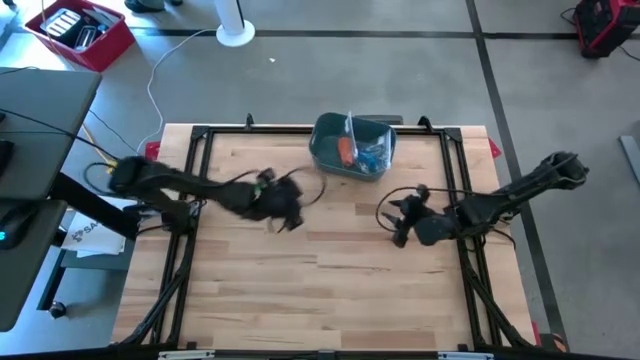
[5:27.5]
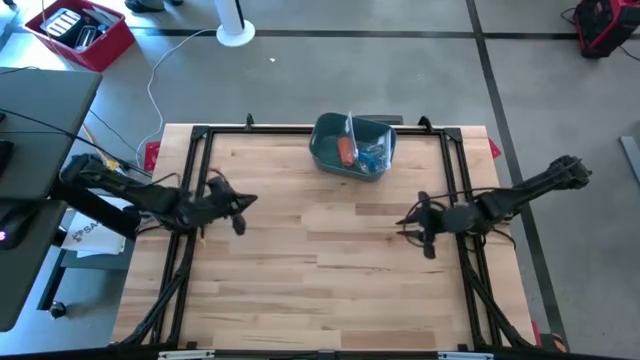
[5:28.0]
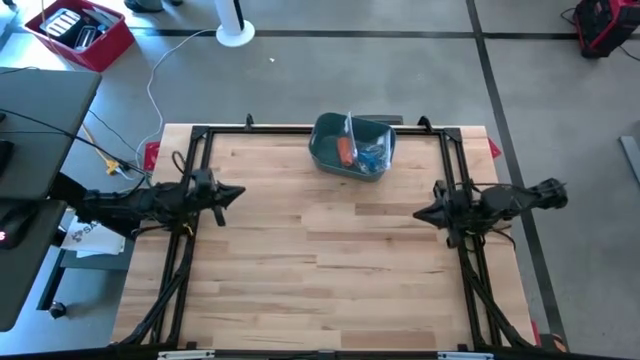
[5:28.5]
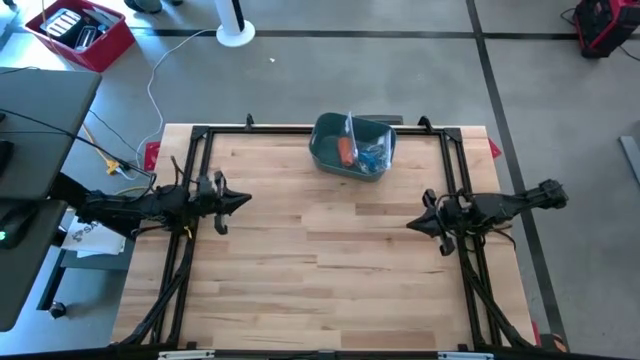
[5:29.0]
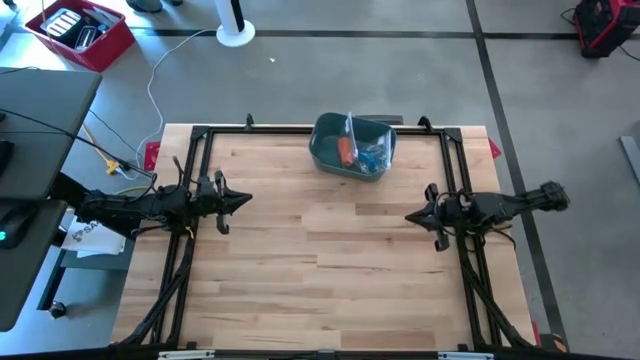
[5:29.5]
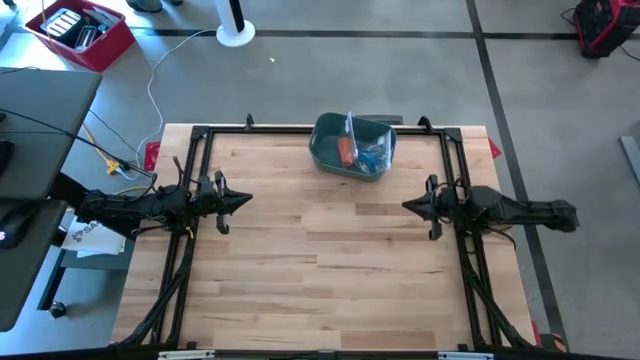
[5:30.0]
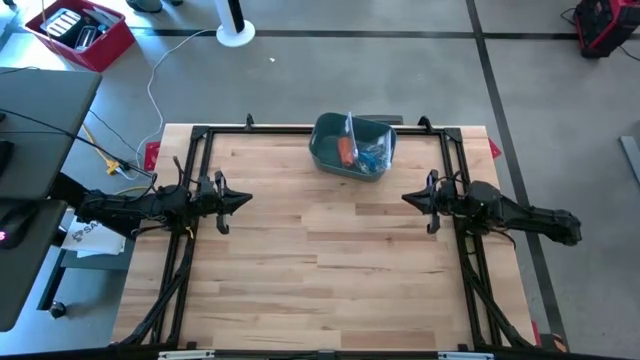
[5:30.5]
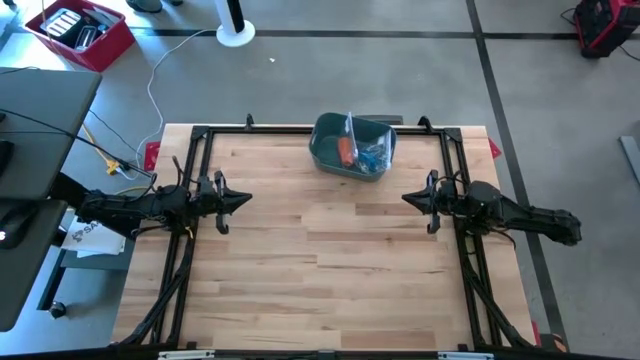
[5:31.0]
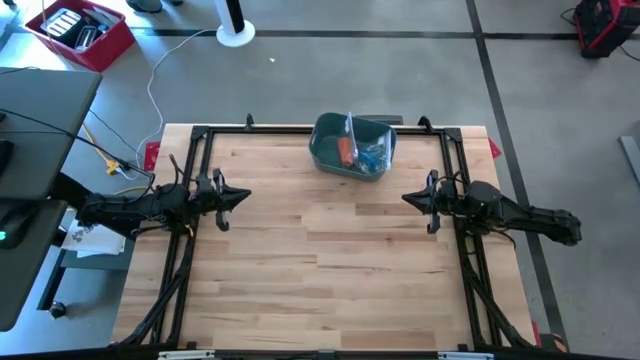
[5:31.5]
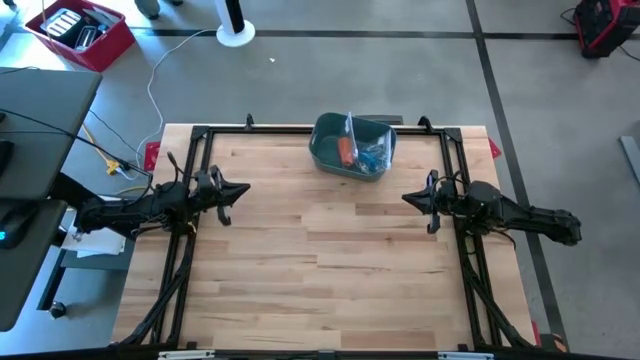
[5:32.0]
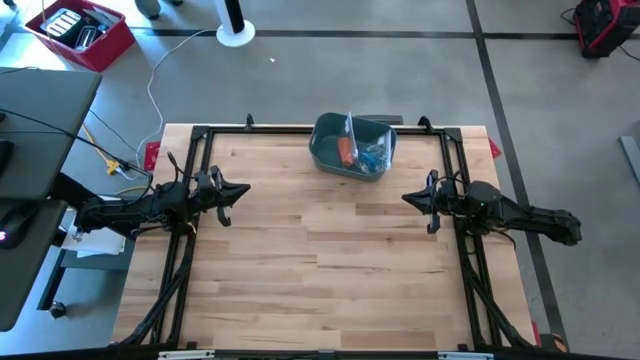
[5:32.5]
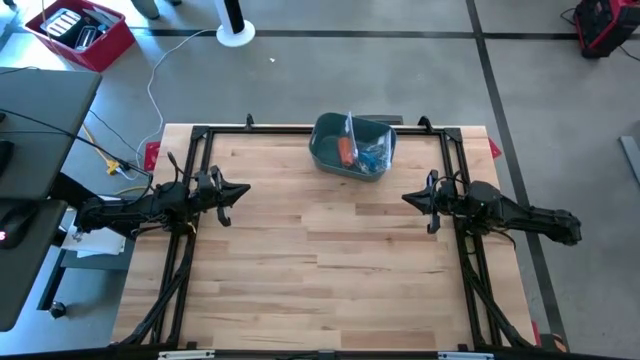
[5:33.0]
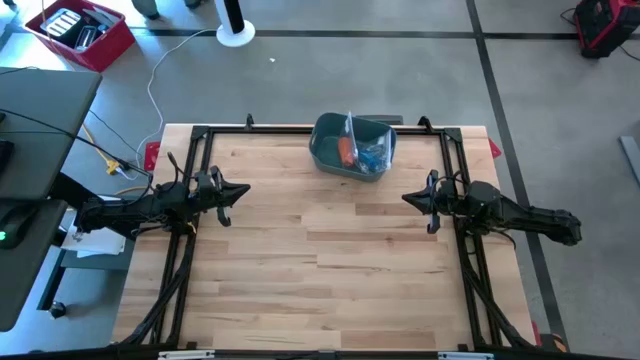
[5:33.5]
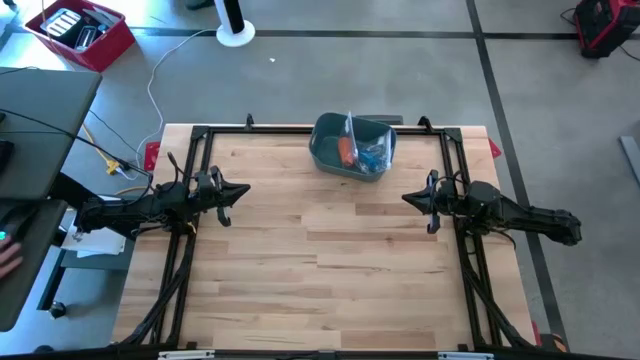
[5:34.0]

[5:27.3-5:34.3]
Task: Roll bandage
Return to home position
